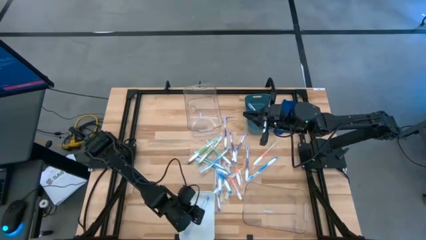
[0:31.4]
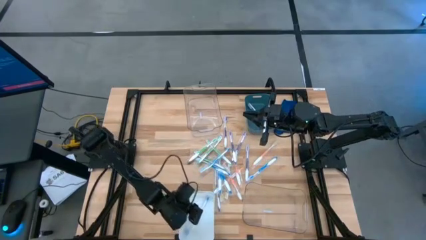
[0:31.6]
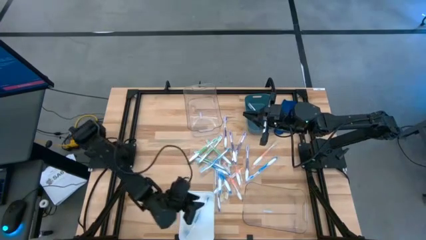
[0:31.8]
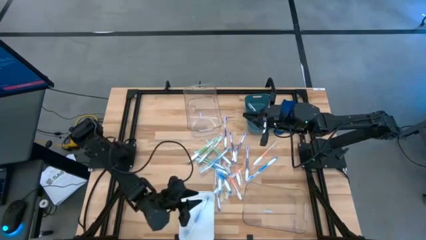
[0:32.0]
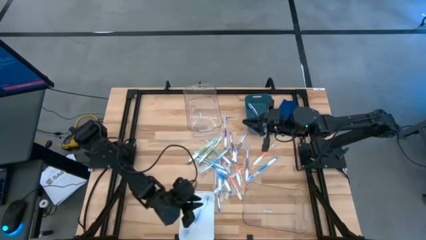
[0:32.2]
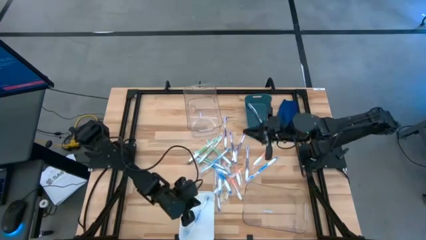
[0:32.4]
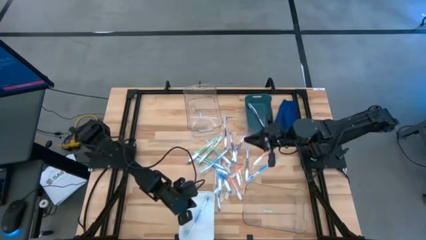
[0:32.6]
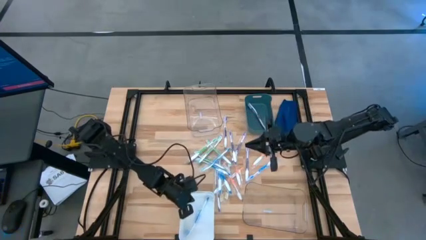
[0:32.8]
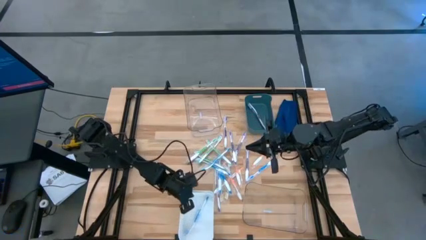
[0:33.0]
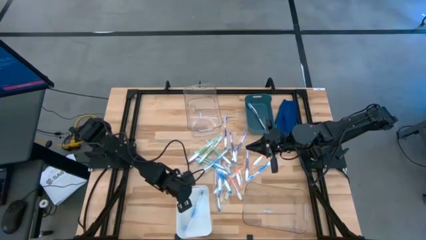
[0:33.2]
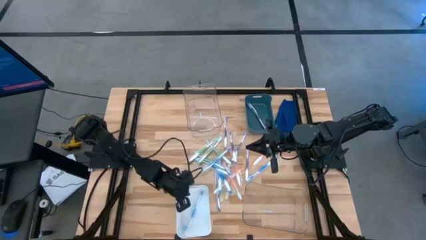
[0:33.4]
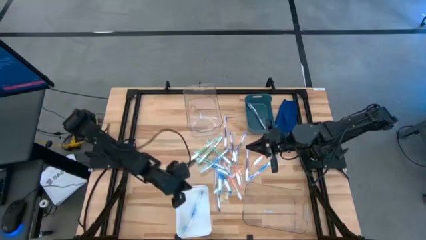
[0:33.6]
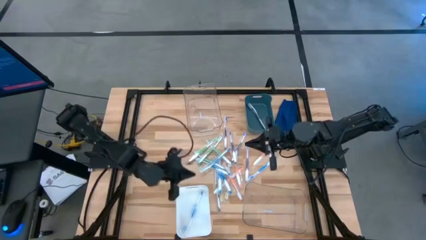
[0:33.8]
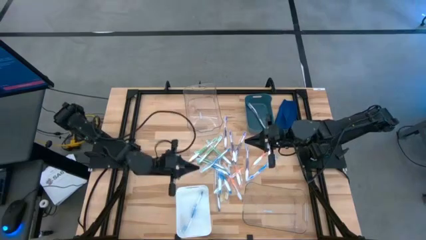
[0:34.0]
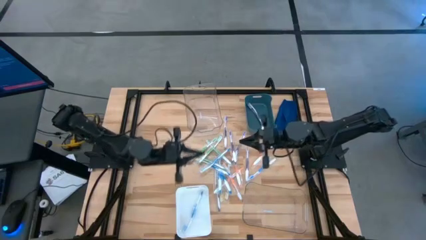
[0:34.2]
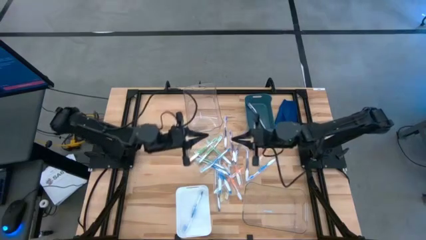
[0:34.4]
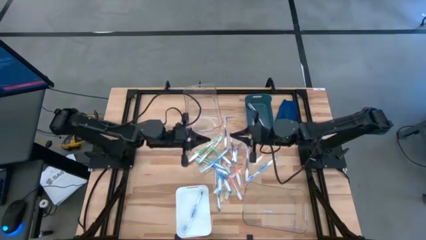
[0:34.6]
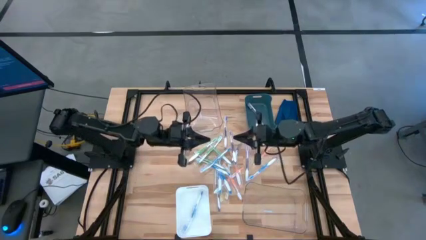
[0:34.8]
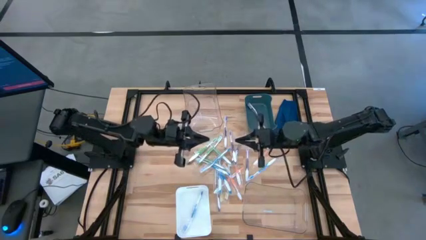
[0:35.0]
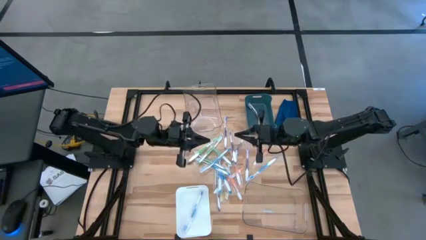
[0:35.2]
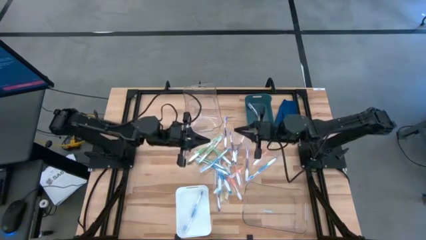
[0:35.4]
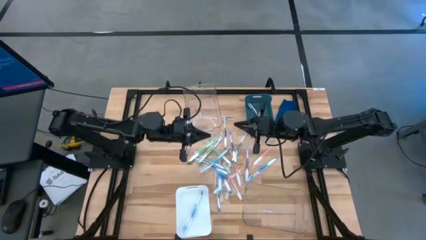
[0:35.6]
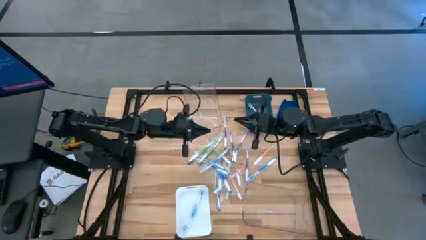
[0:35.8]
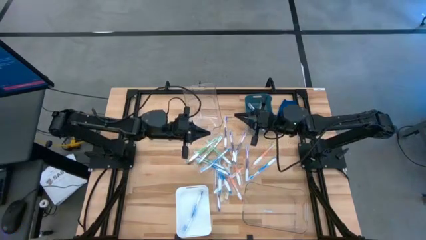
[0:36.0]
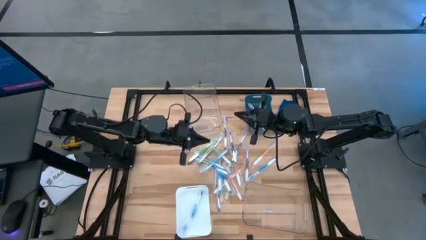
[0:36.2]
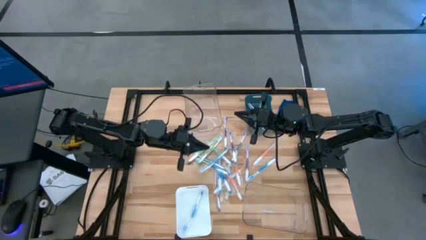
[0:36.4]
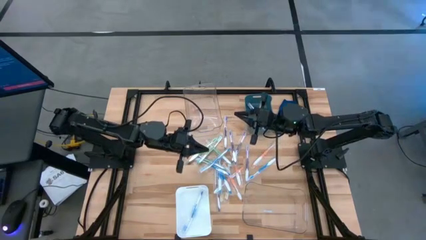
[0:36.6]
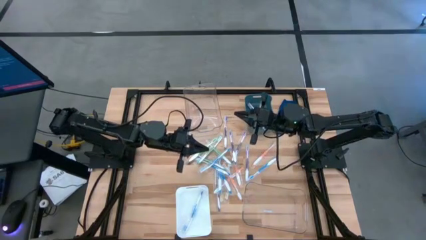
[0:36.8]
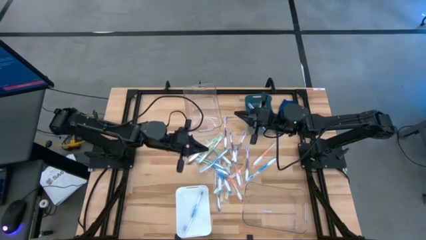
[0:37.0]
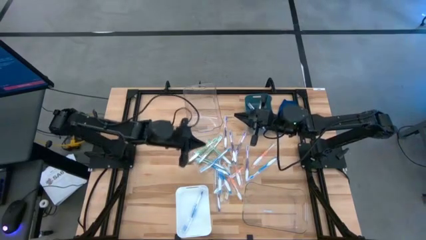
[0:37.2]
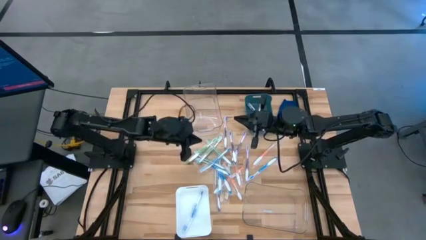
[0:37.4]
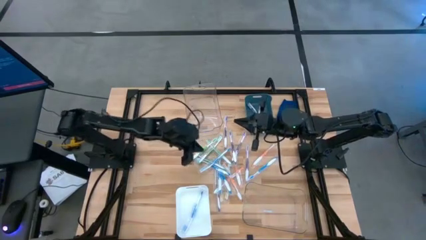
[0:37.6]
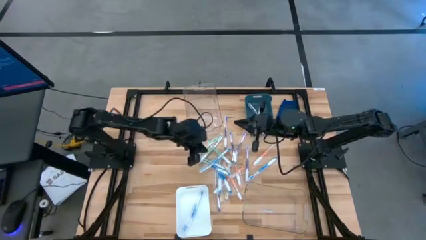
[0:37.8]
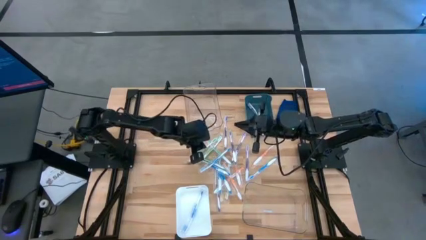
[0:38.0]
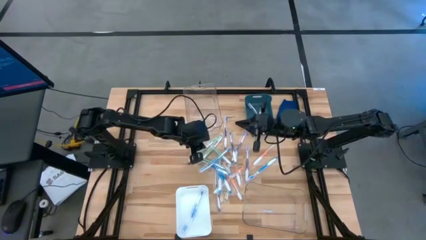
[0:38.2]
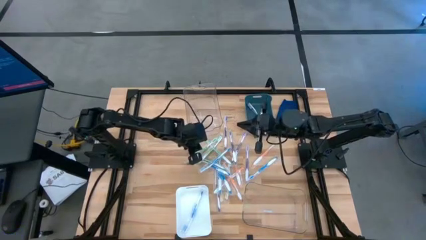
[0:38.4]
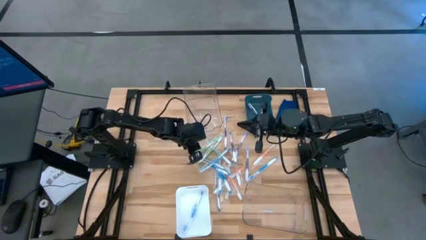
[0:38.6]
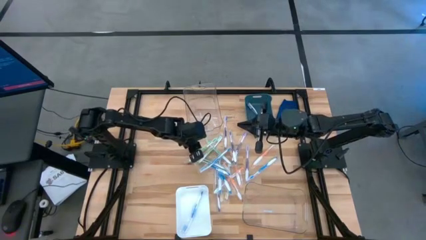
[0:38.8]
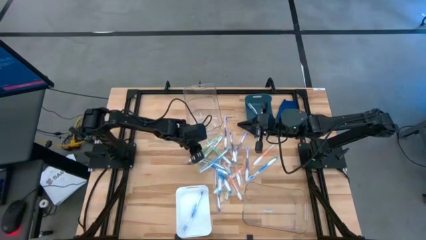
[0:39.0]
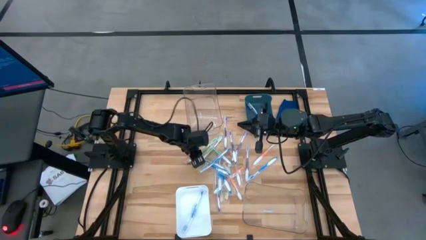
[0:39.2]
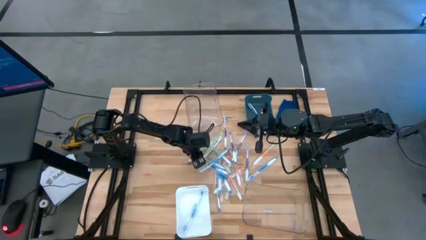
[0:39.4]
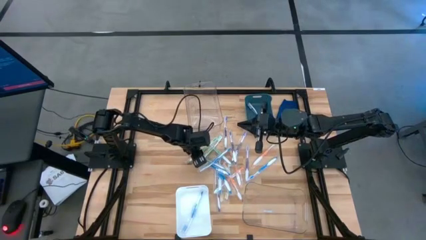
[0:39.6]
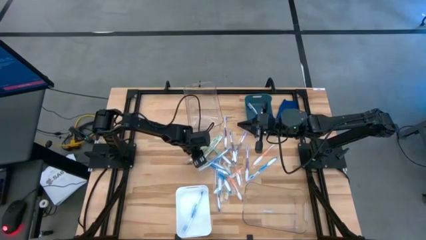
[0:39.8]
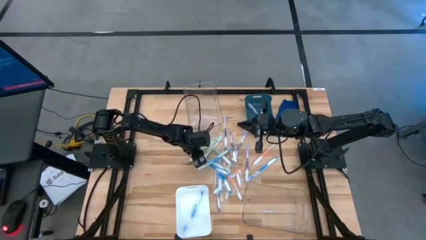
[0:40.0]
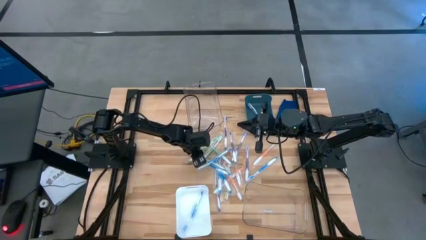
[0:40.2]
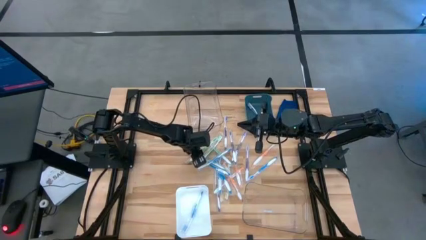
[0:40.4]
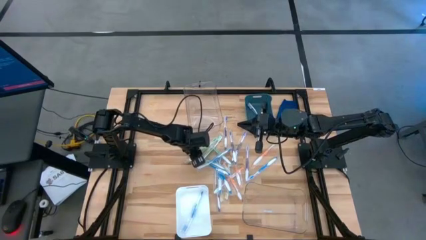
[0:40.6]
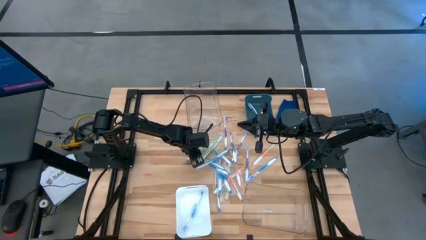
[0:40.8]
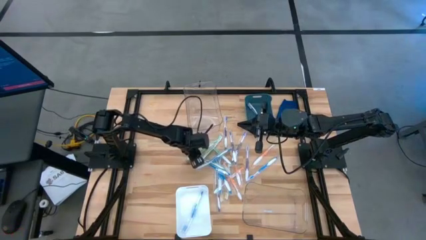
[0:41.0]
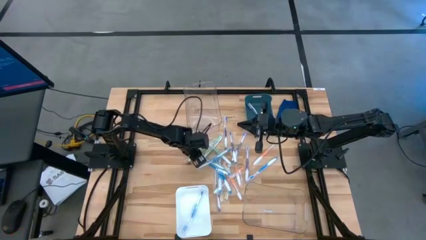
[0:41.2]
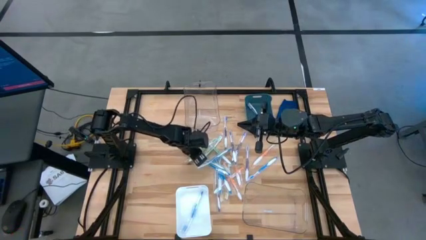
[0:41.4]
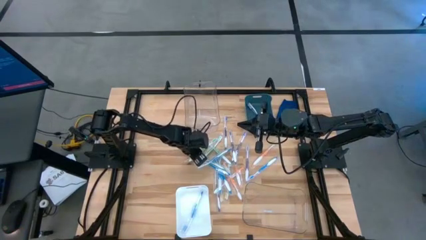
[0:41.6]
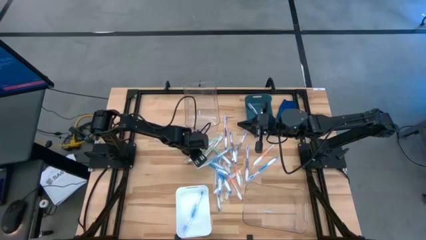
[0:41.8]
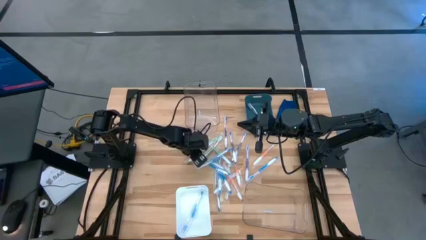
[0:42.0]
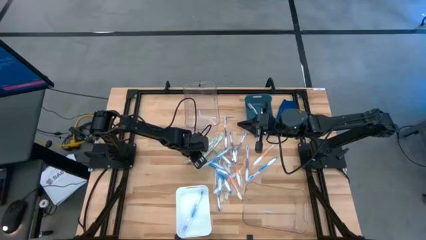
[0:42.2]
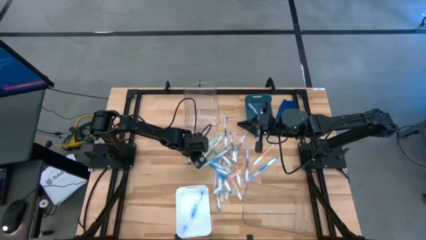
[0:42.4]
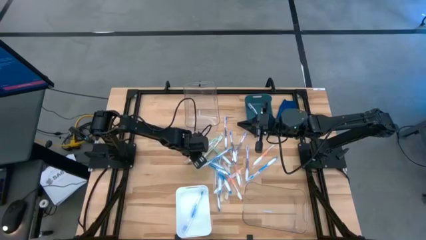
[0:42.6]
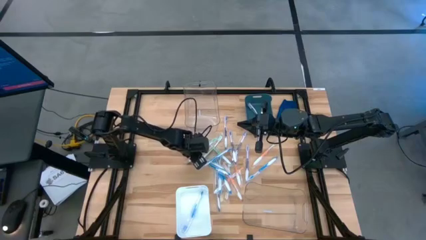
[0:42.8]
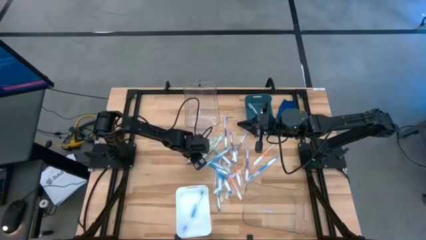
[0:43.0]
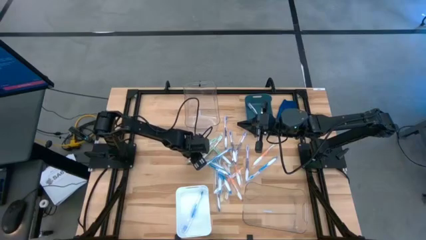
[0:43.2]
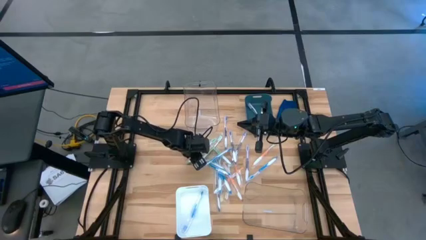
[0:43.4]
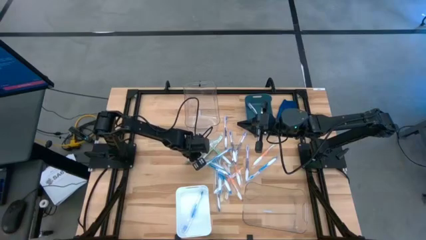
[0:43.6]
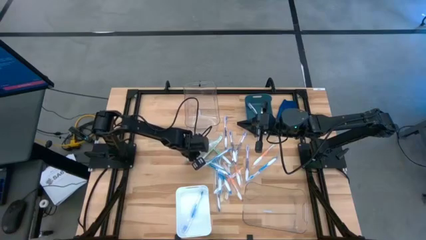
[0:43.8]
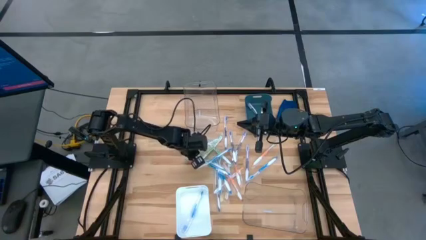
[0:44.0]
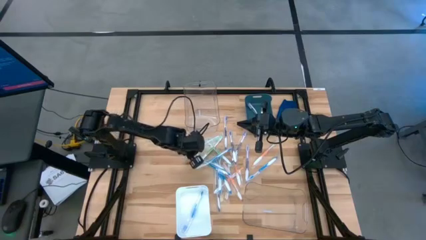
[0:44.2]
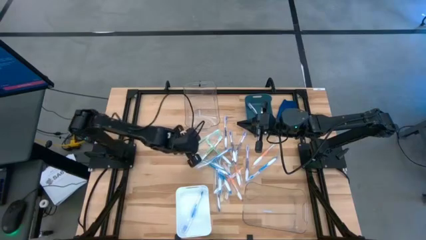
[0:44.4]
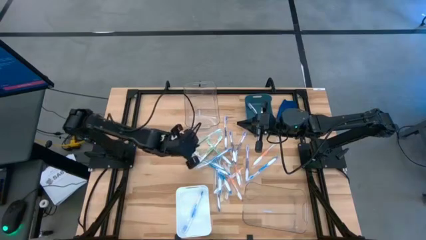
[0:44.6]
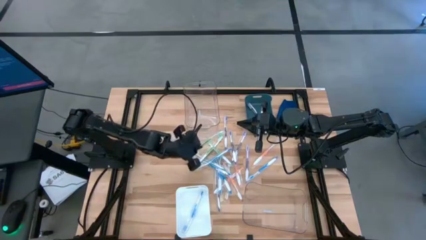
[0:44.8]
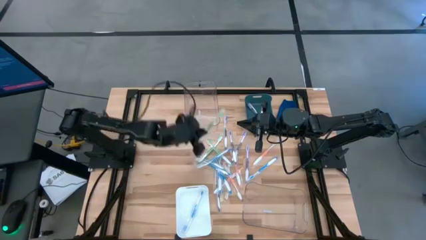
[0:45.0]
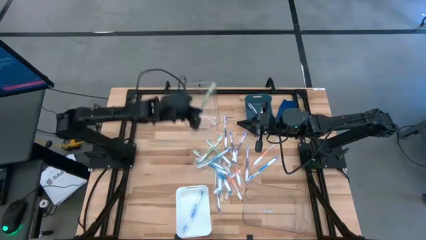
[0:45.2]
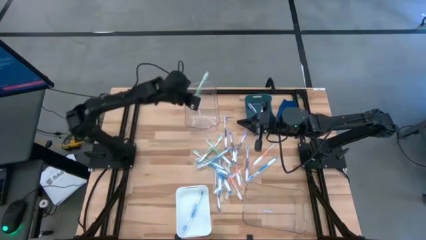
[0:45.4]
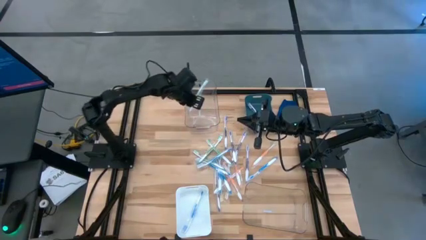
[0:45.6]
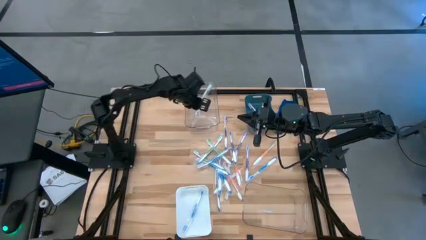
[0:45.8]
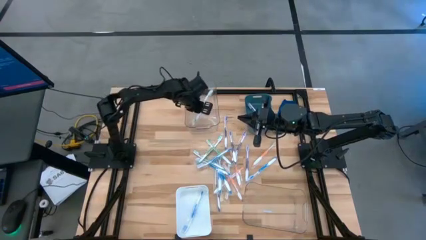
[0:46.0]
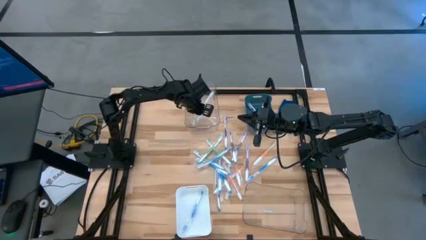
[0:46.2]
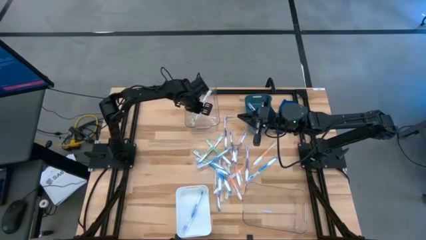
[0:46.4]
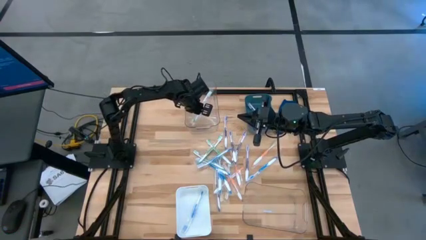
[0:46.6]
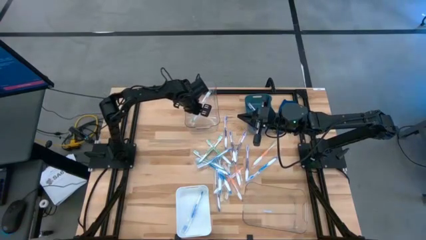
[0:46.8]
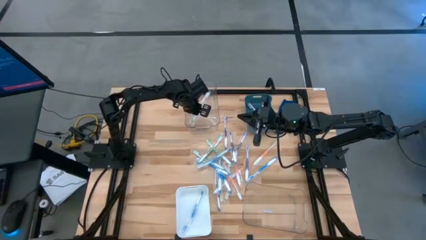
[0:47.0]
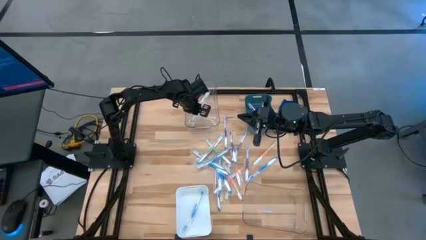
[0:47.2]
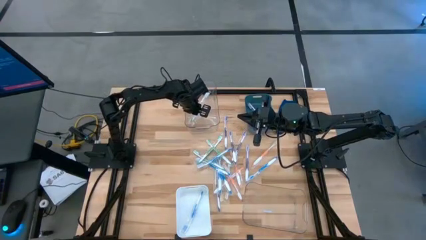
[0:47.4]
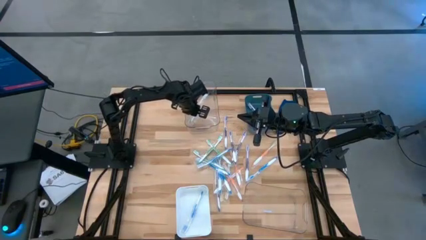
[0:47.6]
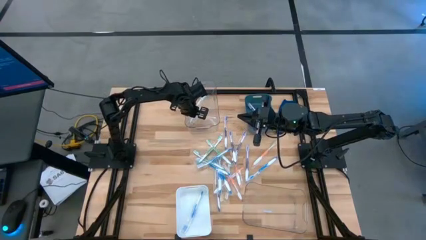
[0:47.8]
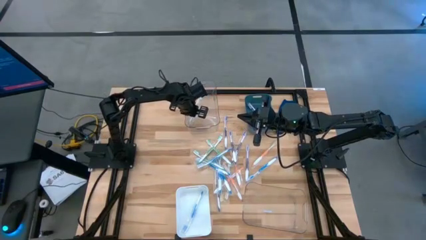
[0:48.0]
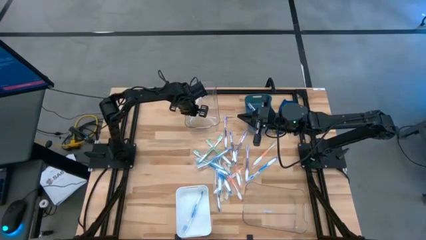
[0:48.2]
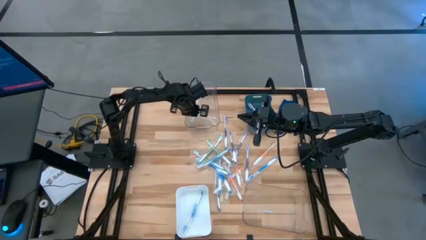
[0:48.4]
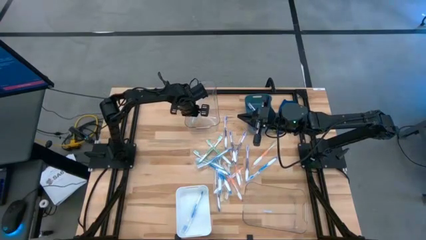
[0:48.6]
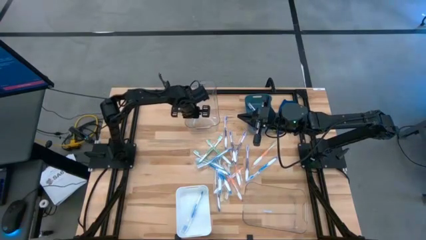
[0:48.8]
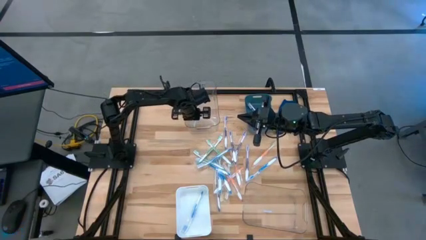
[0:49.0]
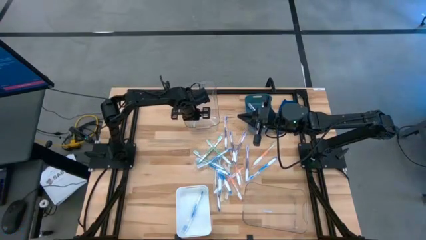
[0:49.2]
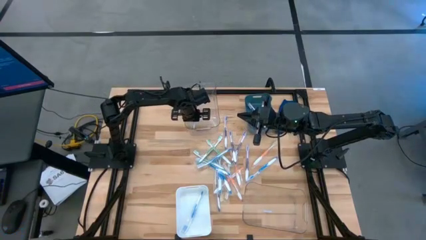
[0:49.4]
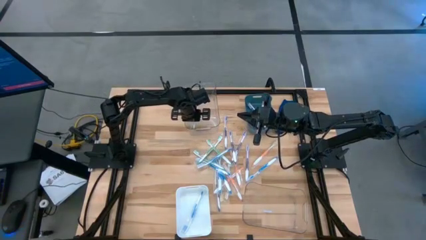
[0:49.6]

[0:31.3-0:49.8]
Task: Pick & Place Toothbrushes
Put the green toothbrush into the top transparent bin
